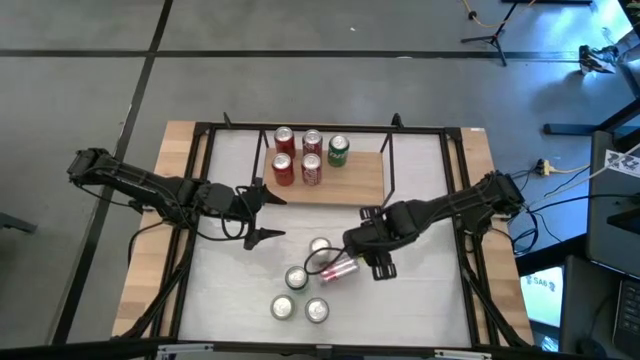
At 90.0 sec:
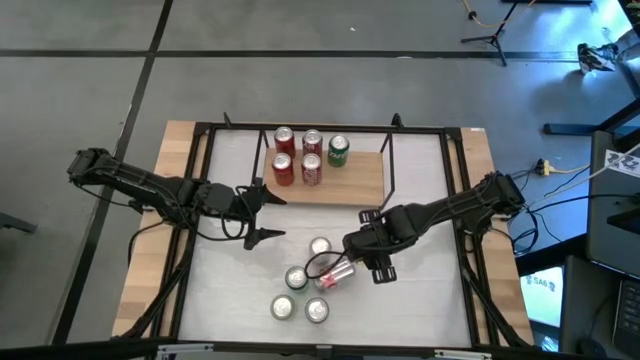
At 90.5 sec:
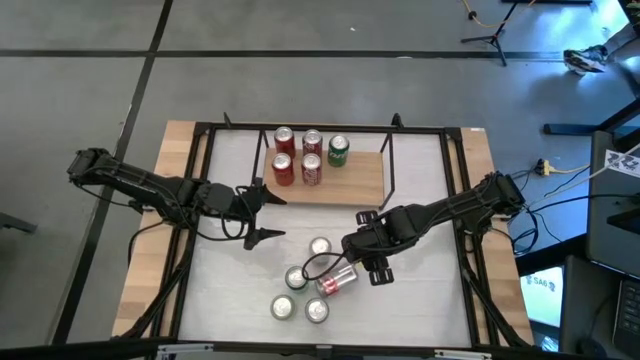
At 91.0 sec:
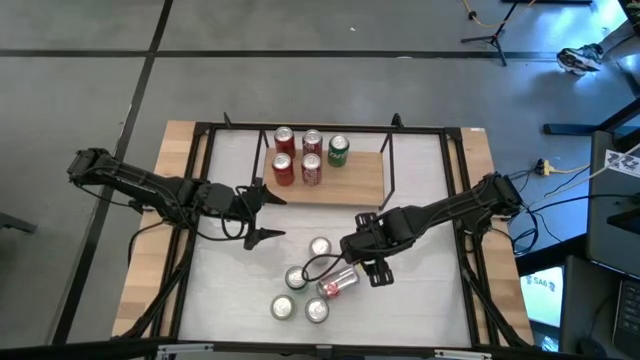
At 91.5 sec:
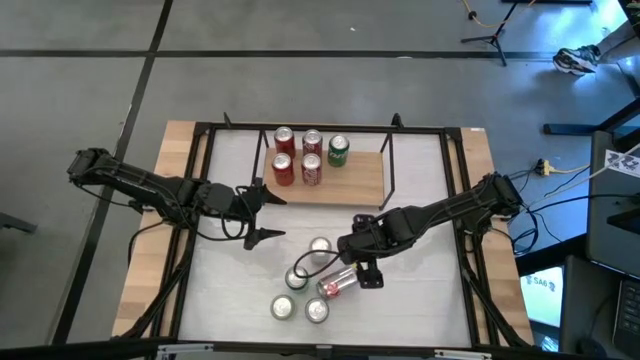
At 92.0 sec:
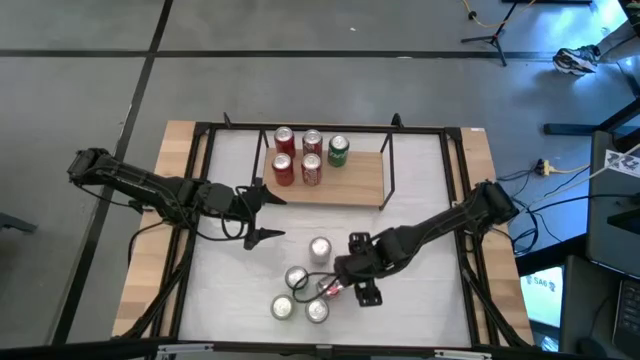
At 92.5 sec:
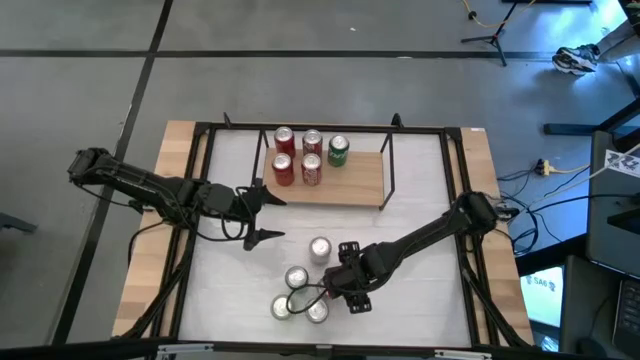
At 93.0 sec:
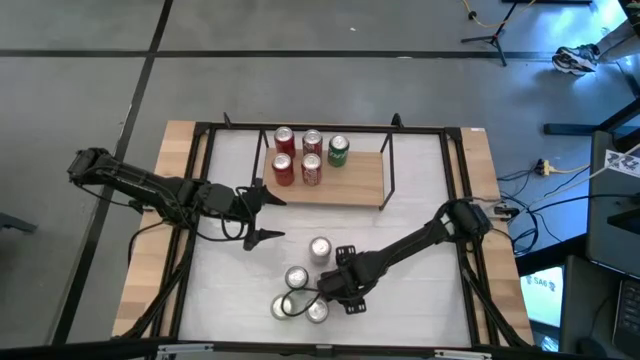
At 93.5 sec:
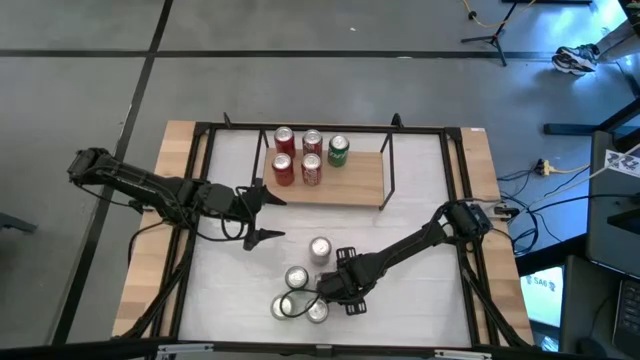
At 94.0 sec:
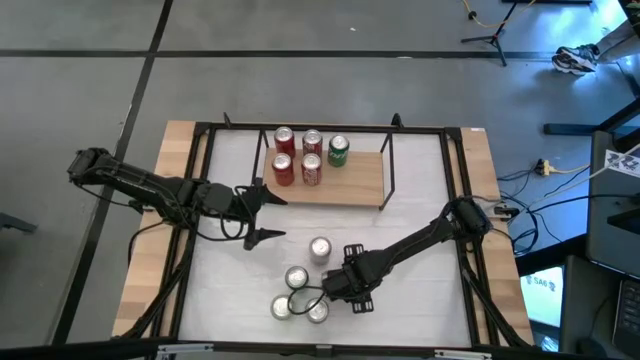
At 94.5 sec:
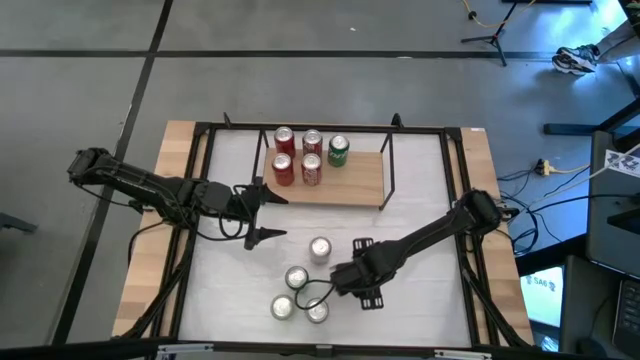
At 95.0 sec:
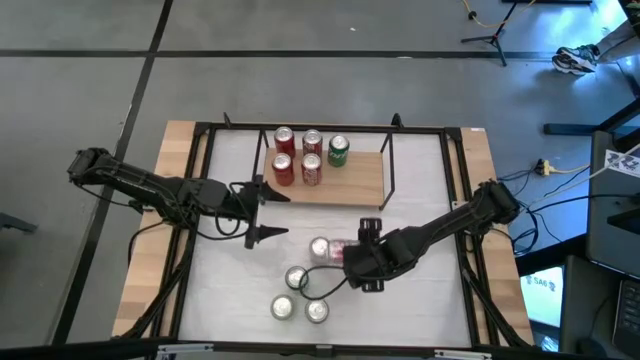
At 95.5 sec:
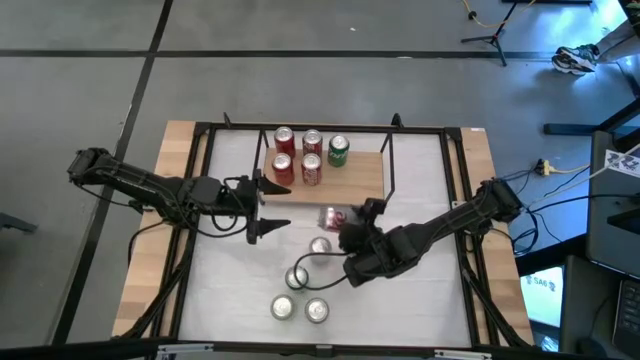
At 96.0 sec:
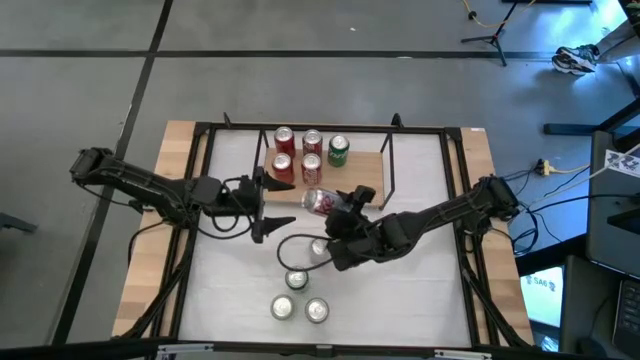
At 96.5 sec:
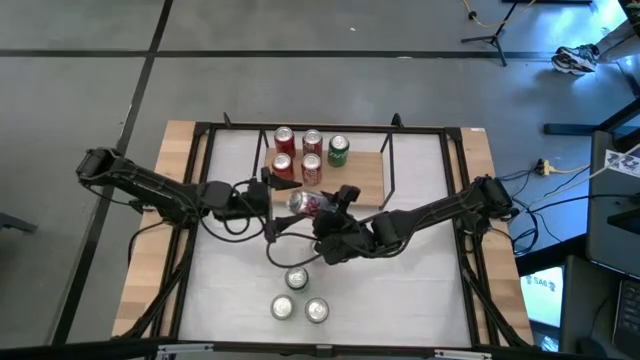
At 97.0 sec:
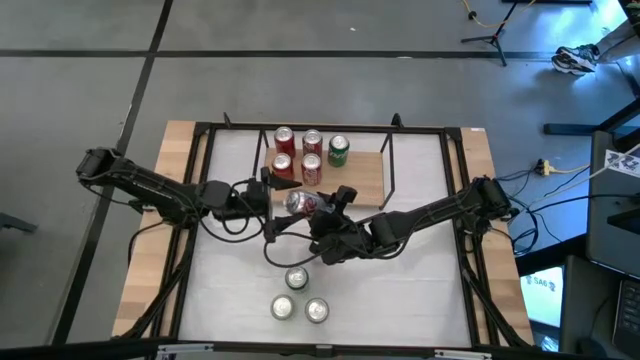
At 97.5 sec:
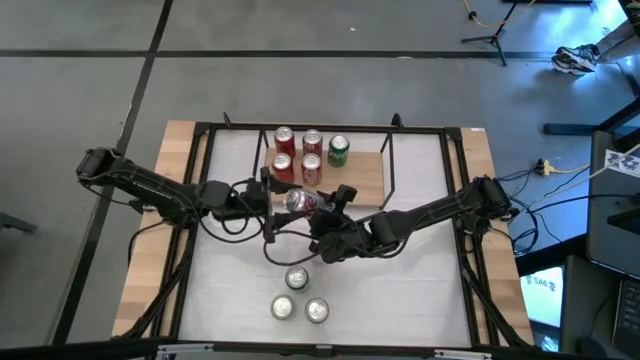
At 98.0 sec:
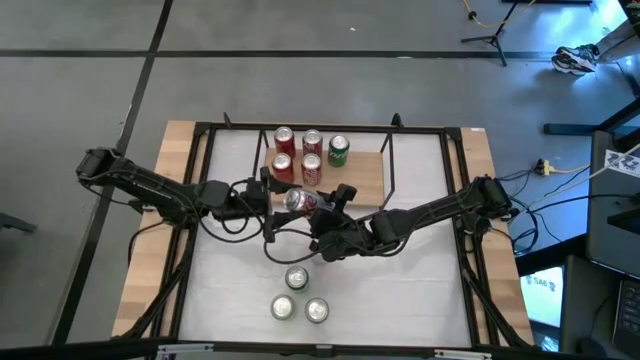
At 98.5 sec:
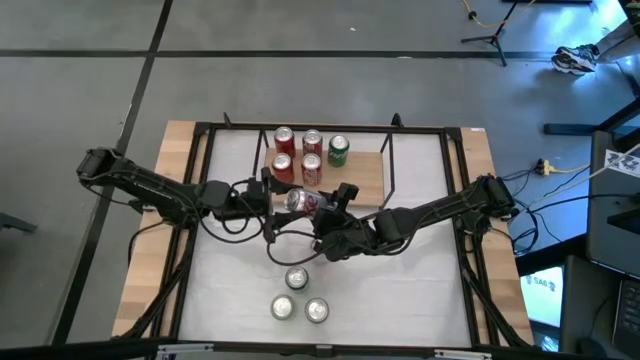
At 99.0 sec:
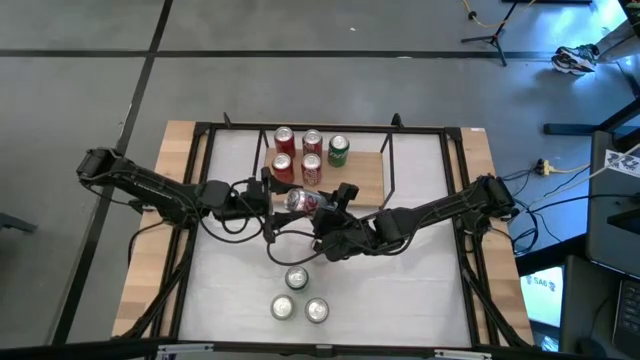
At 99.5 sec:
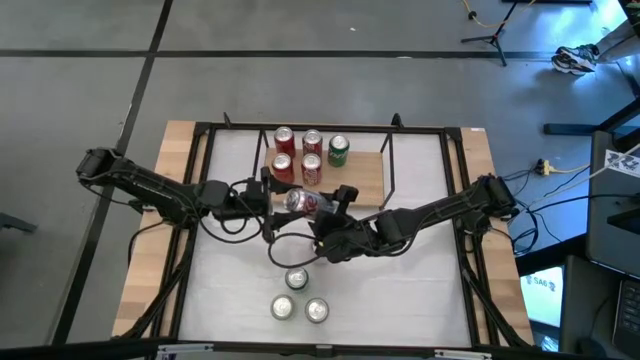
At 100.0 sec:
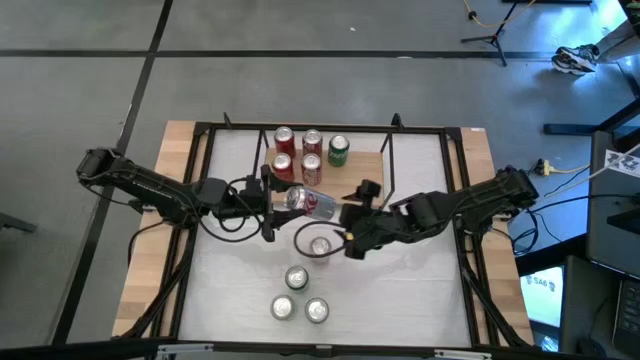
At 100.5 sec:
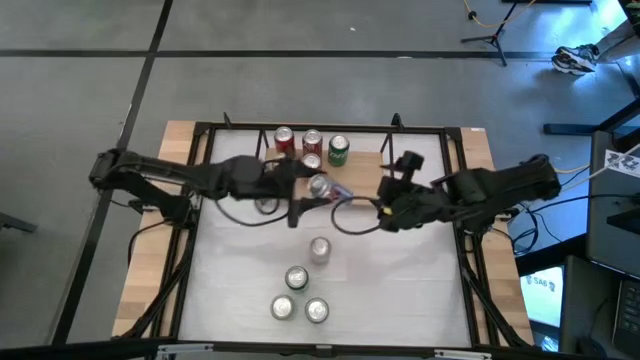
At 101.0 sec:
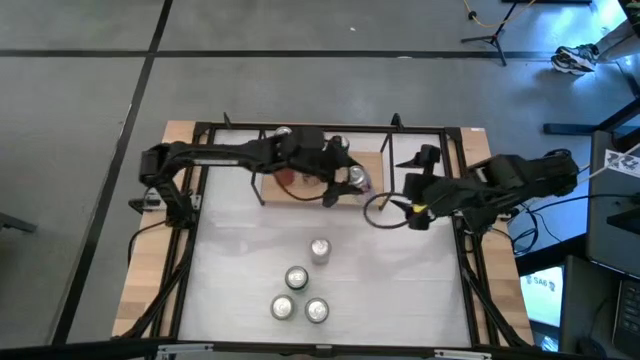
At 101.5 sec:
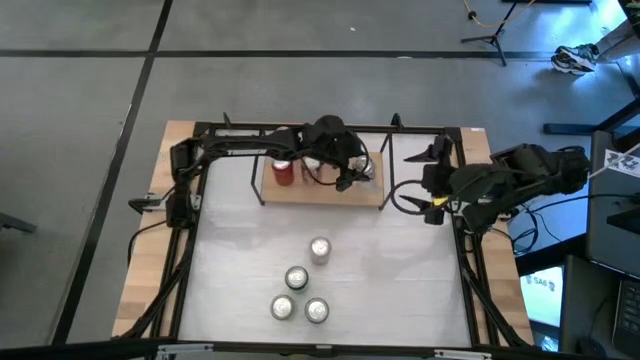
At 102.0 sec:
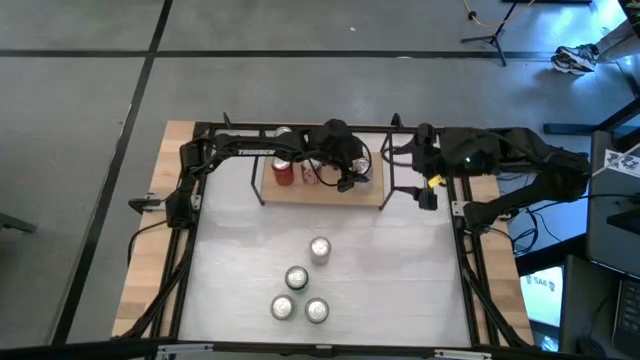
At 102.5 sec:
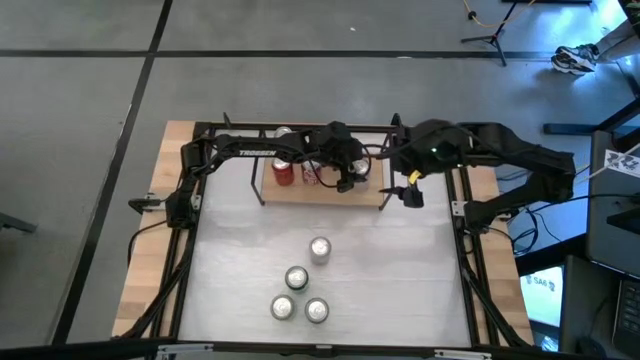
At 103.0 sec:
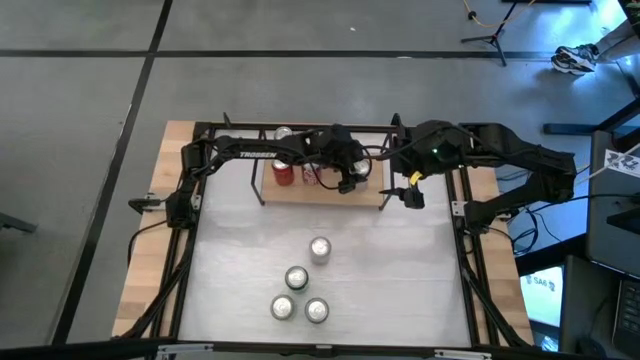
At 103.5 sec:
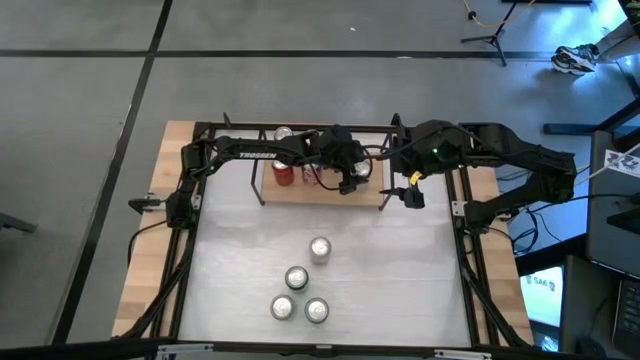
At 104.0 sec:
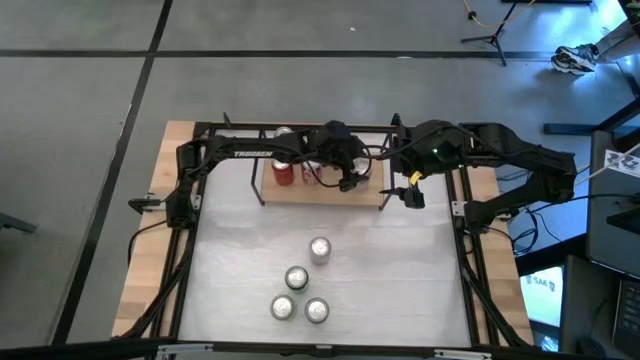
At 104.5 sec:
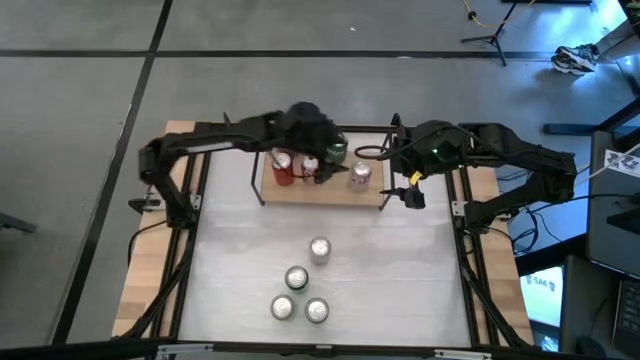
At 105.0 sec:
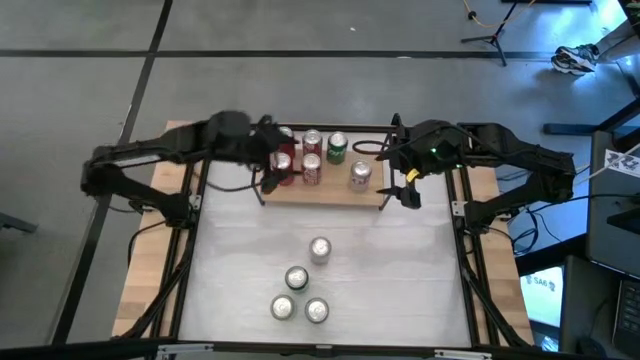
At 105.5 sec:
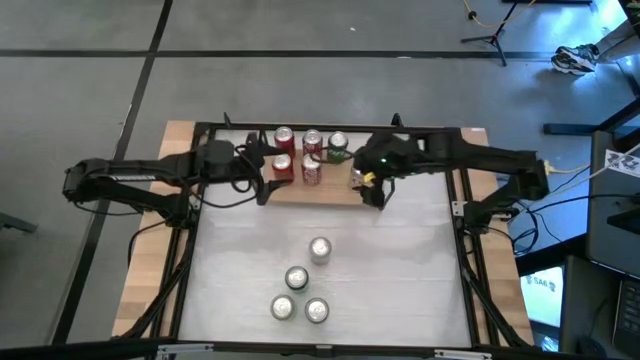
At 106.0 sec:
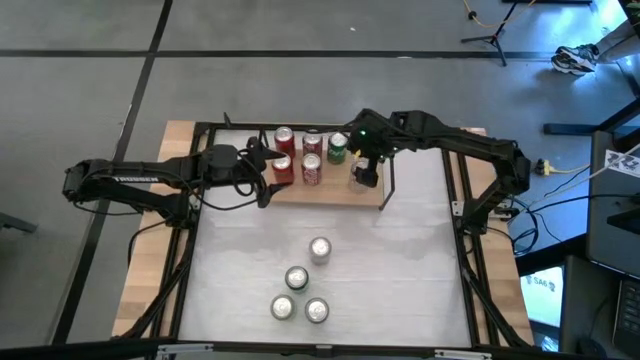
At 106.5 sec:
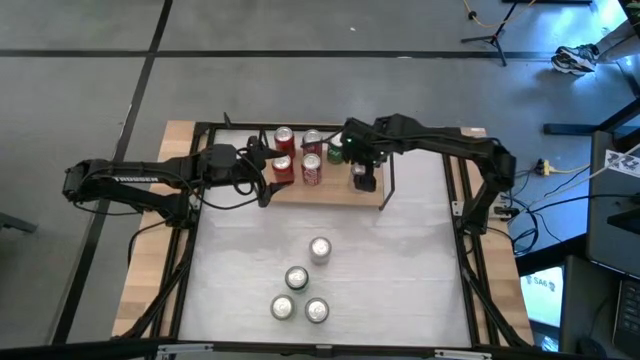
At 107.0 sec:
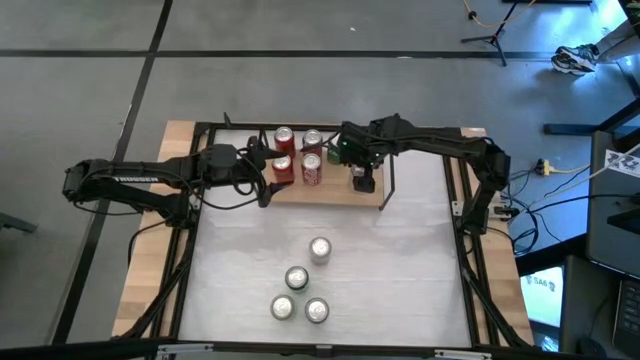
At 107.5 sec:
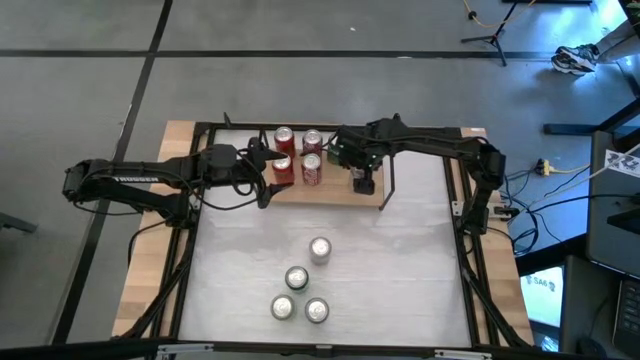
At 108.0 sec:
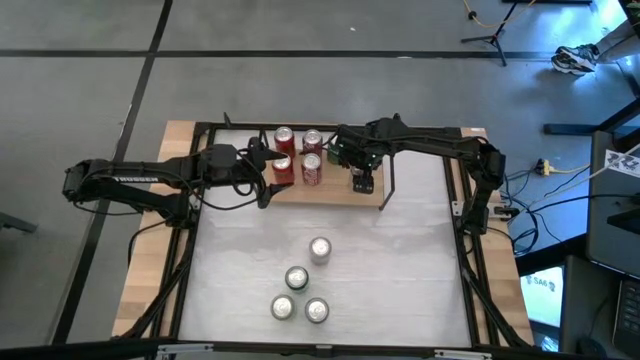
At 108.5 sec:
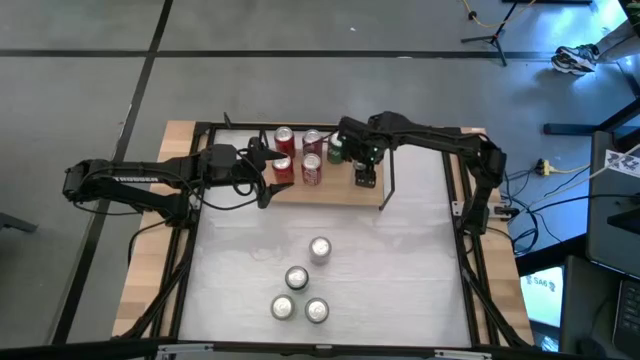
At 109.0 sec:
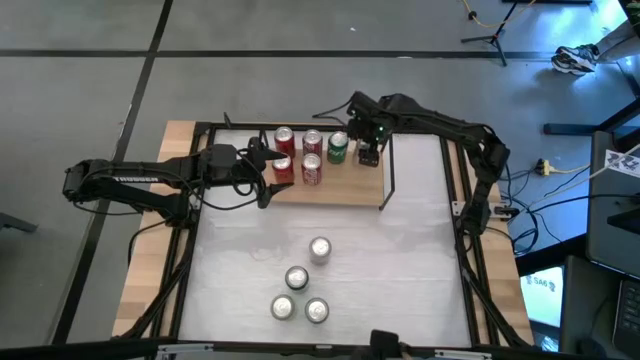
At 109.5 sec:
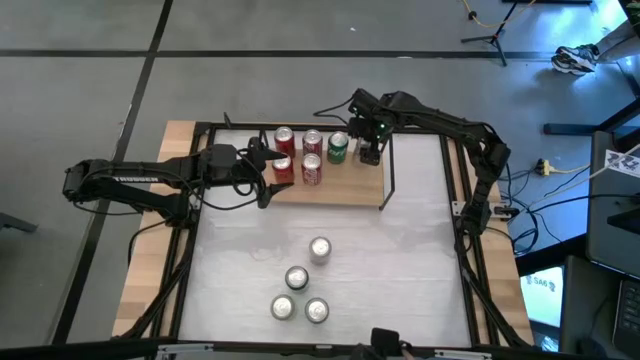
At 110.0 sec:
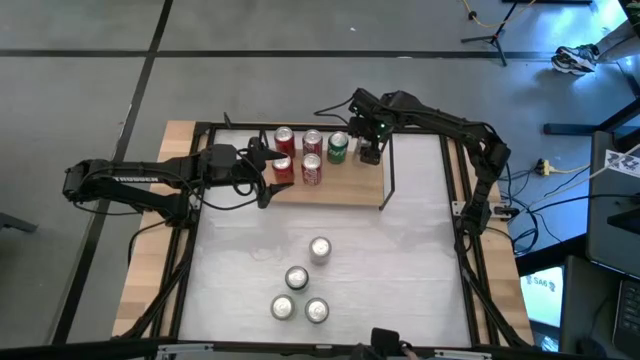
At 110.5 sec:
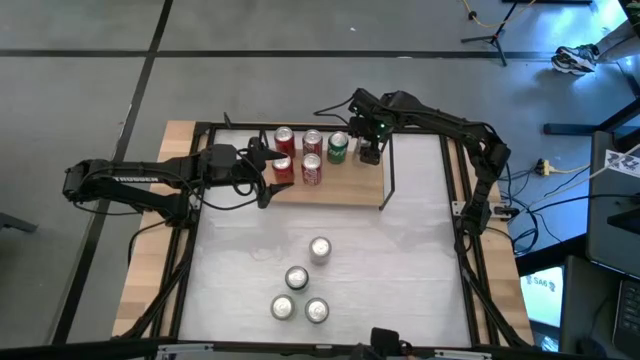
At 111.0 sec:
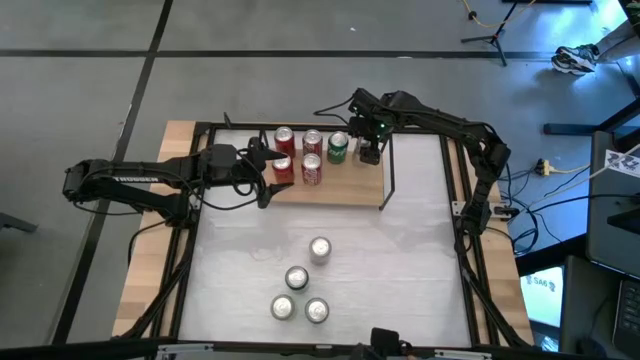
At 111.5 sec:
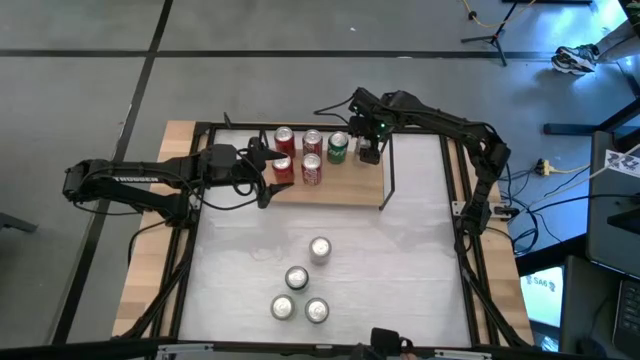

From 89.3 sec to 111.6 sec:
Task: Place canned beverage on shelf
Put the top silver soda can on the shelf
